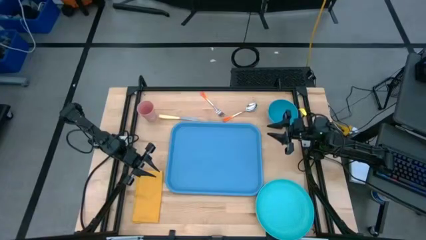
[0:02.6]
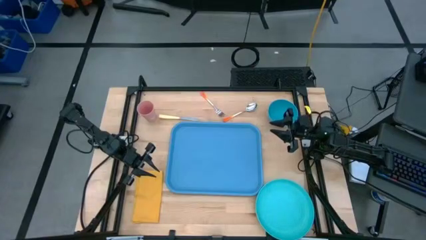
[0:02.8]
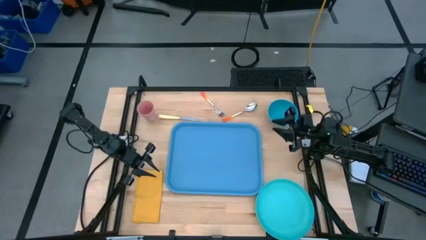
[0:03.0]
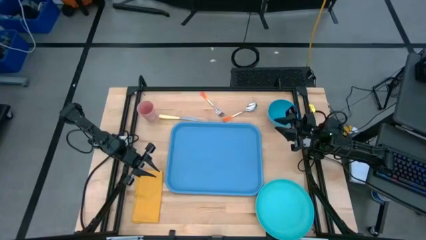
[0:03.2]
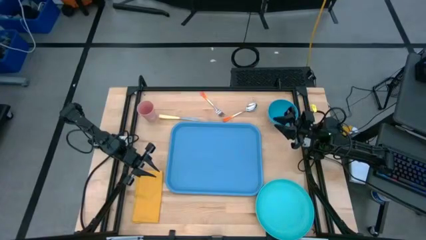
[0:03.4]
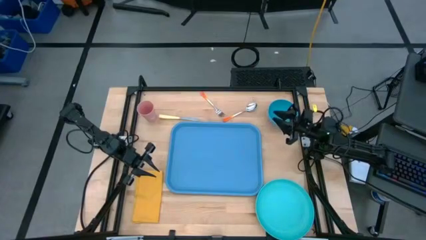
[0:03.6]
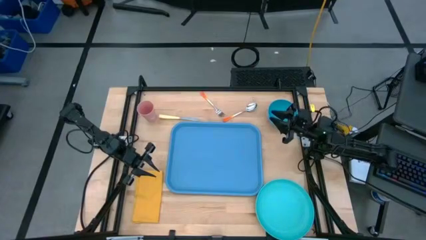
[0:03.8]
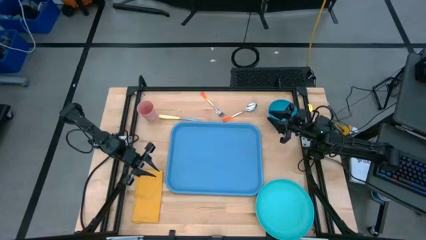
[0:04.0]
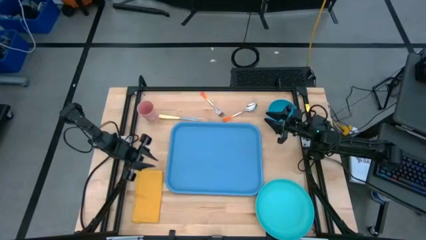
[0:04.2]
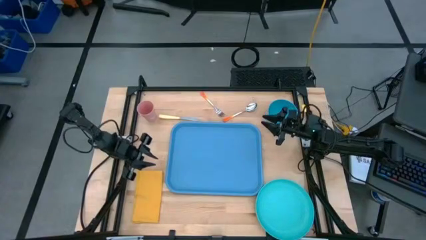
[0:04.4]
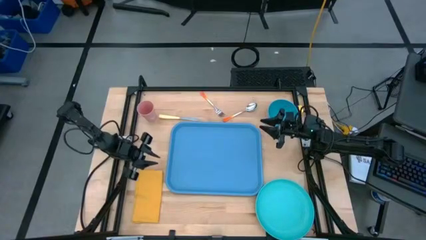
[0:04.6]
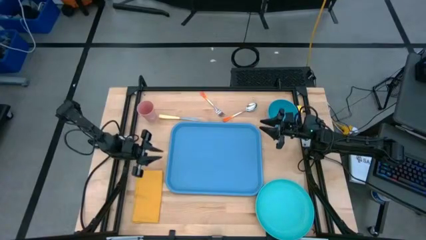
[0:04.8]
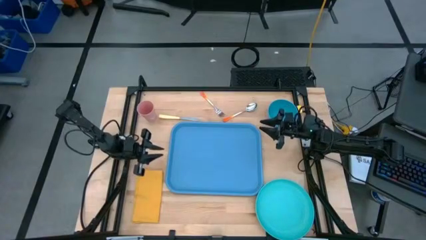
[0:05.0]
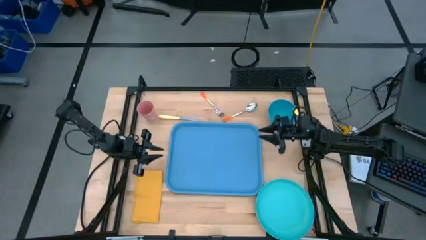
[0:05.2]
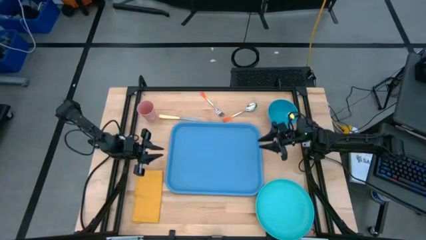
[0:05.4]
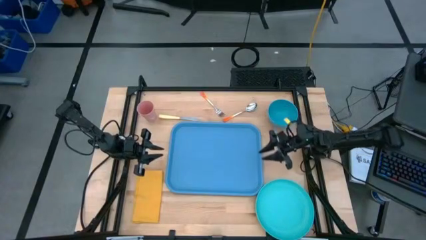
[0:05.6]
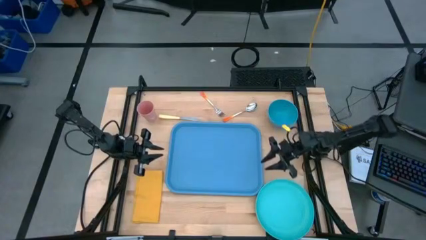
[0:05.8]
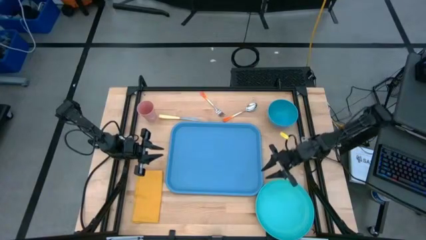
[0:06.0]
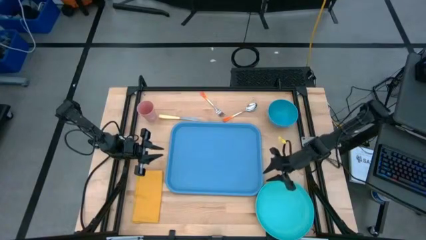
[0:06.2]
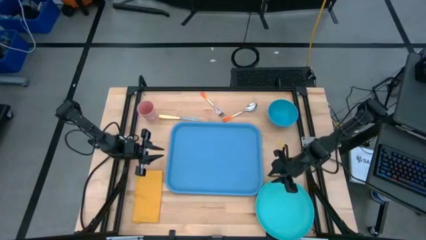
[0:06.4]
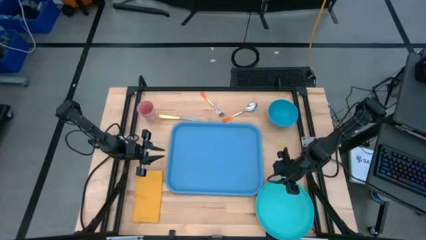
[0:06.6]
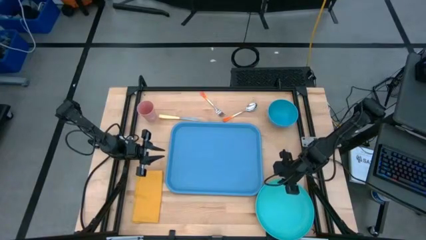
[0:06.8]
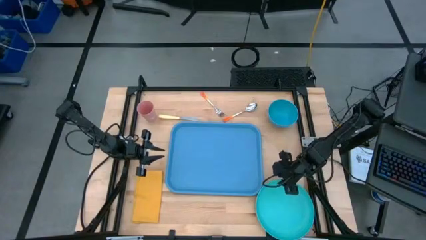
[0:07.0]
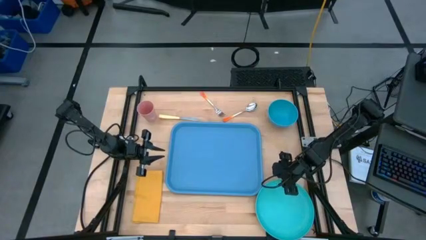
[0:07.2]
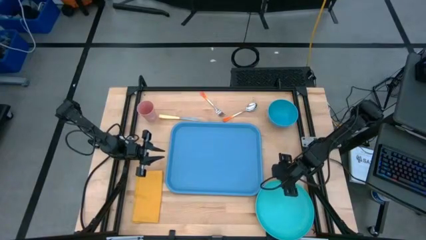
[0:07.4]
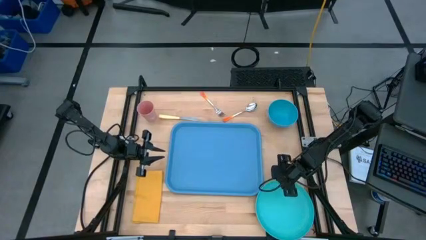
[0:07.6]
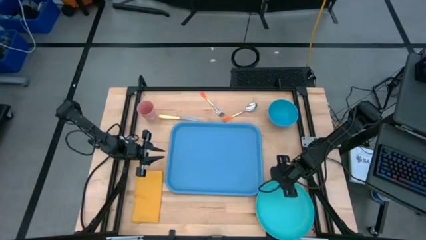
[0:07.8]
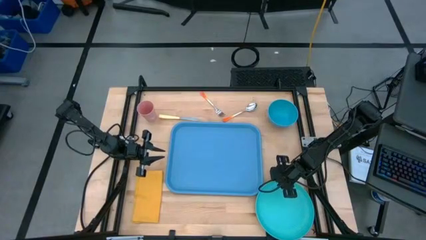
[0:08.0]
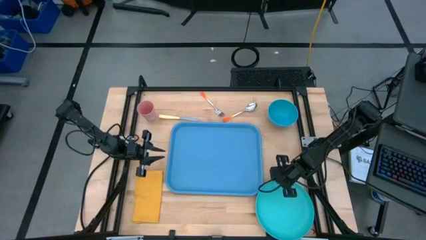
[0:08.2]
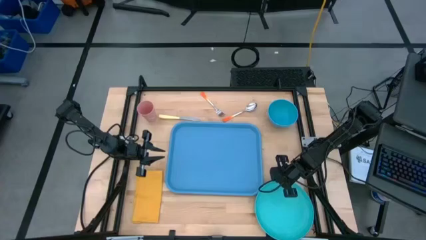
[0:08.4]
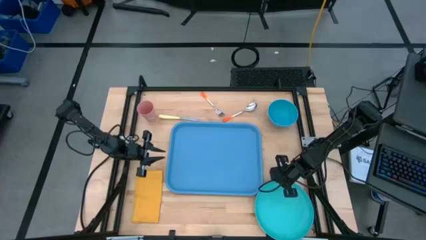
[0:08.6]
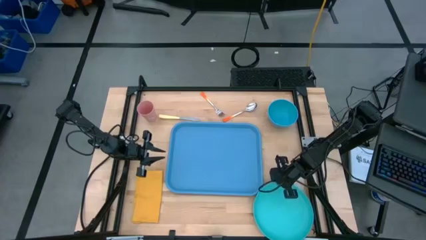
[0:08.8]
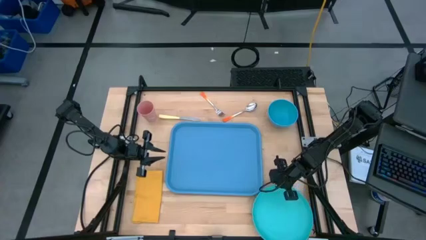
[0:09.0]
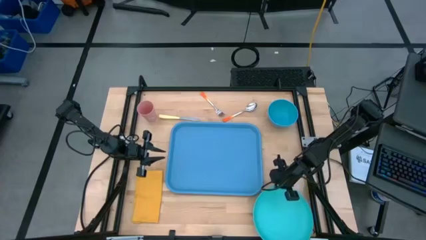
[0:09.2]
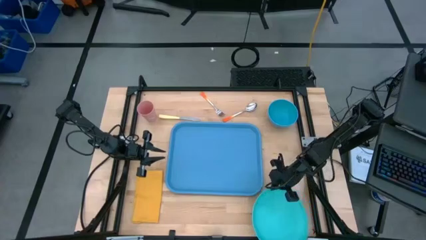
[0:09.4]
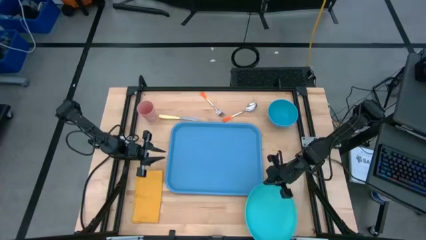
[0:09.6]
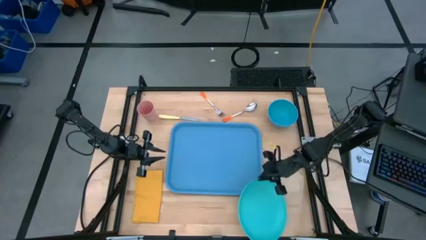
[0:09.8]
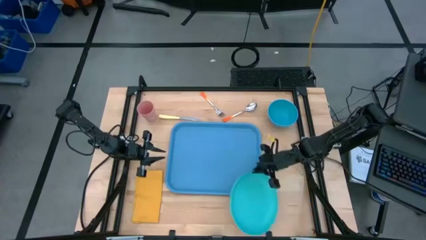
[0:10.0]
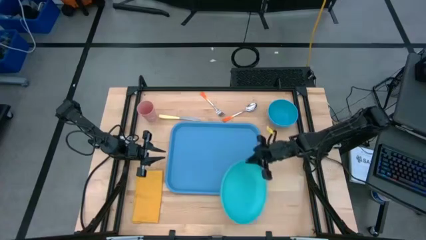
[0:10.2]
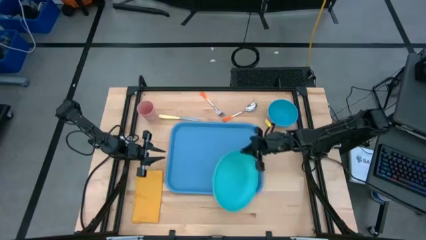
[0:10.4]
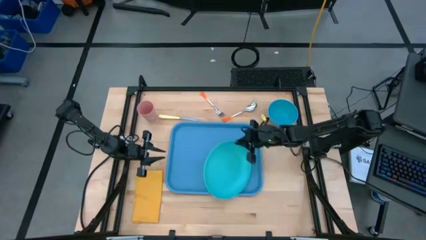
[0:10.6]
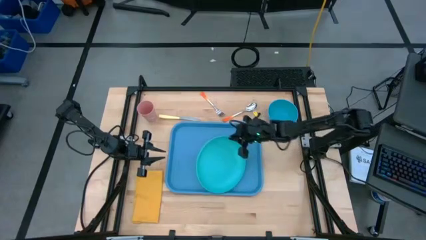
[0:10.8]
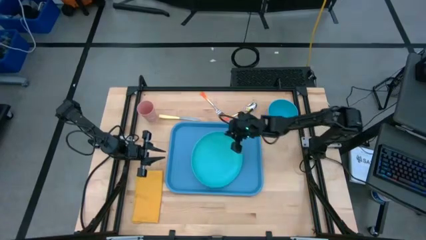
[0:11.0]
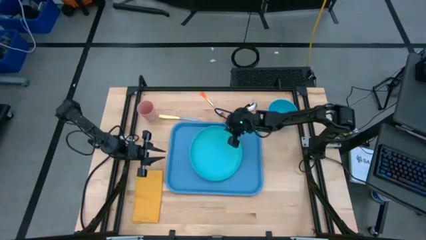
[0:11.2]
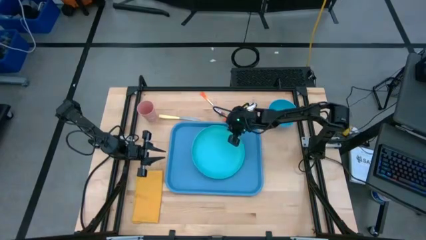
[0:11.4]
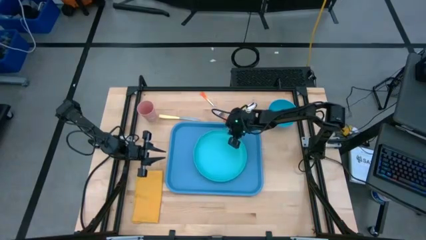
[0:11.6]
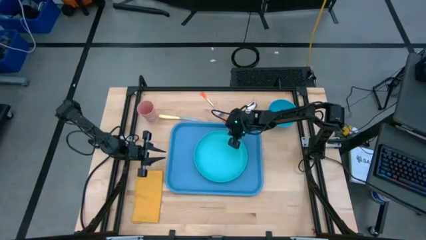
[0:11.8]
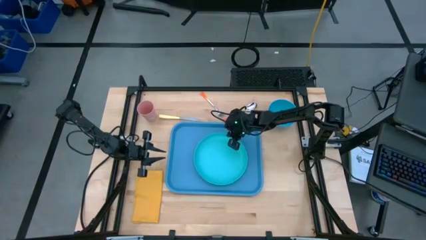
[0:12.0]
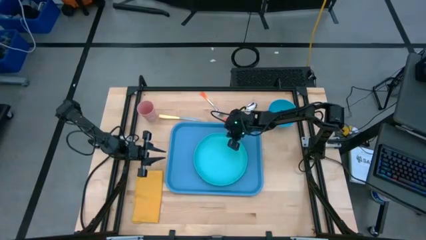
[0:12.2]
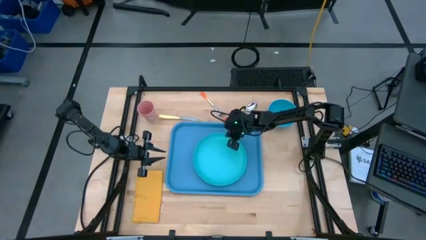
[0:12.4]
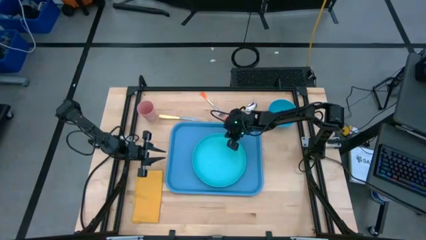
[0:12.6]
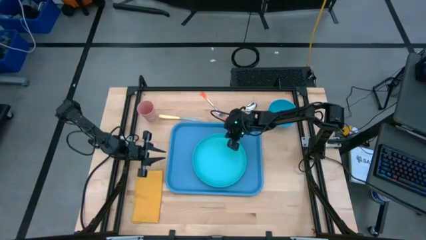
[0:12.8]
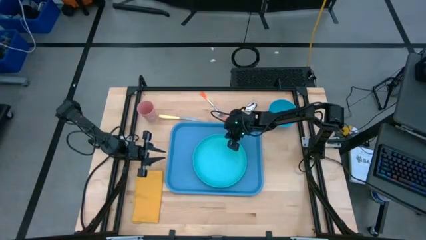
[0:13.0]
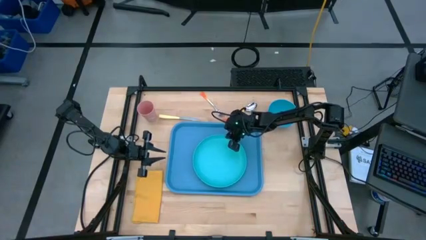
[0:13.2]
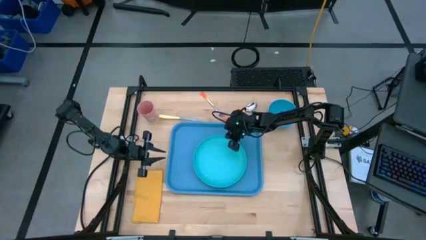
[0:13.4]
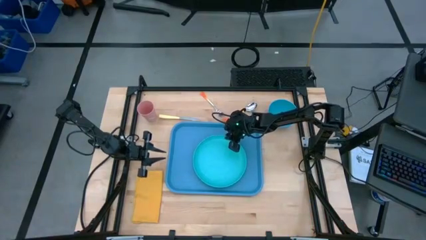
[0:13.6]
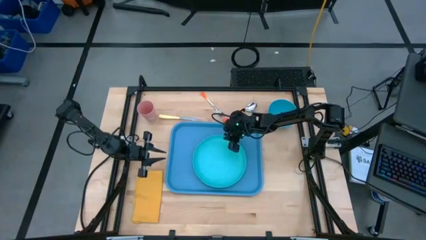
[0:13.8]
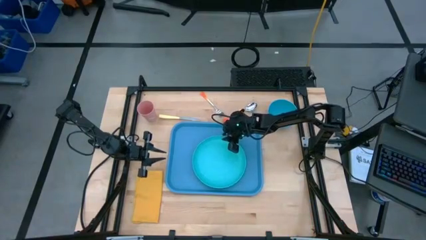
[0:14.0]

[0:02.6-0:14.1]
Task: Set up tray
Put the green plate on the blue tray

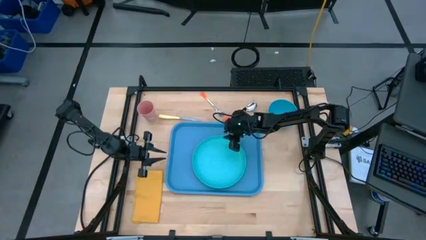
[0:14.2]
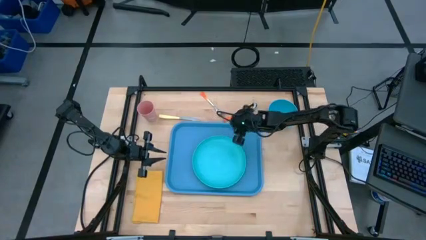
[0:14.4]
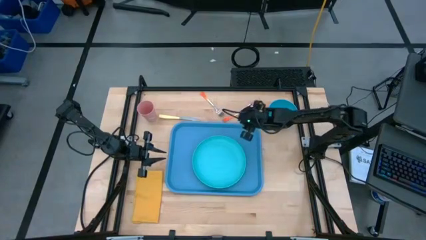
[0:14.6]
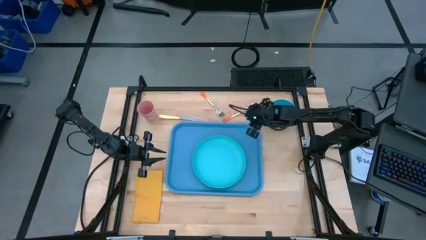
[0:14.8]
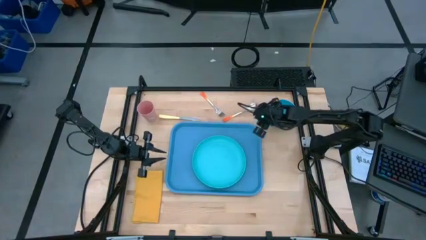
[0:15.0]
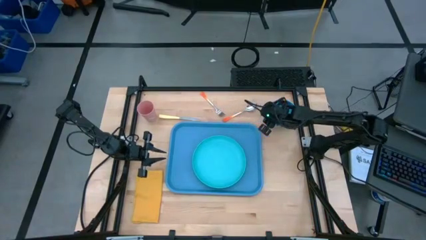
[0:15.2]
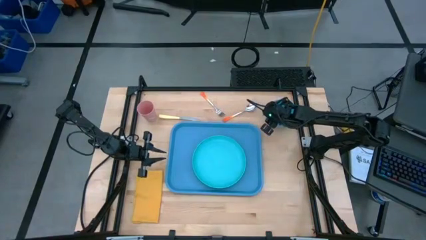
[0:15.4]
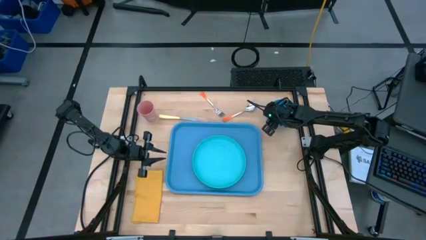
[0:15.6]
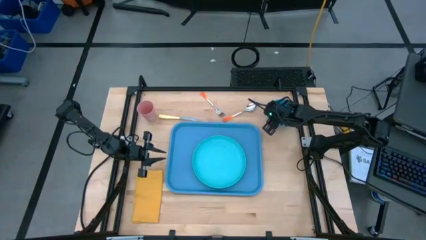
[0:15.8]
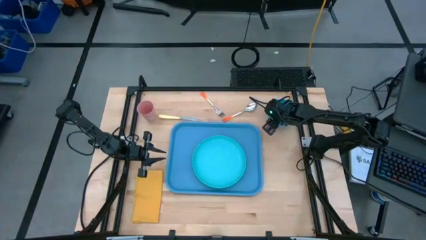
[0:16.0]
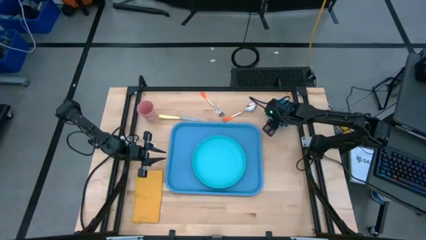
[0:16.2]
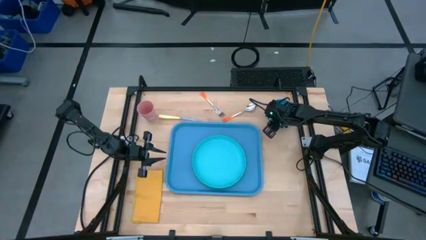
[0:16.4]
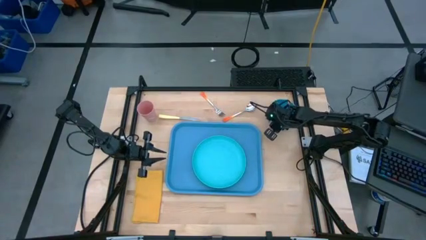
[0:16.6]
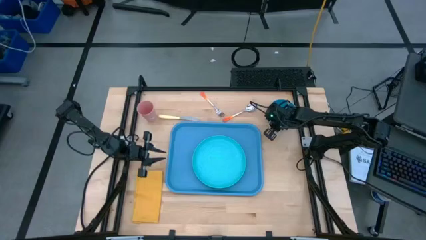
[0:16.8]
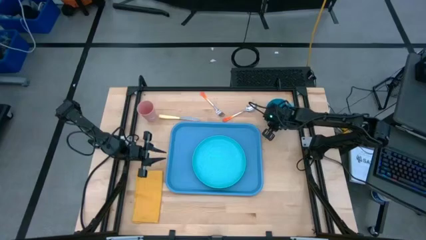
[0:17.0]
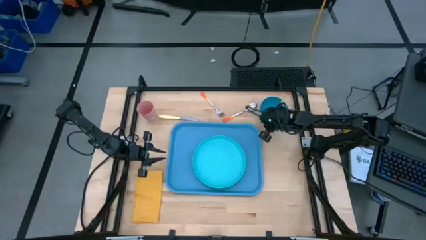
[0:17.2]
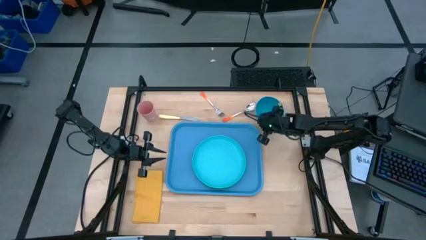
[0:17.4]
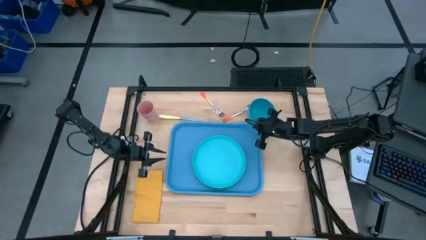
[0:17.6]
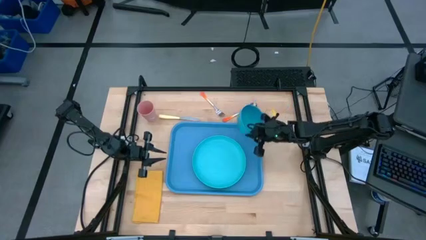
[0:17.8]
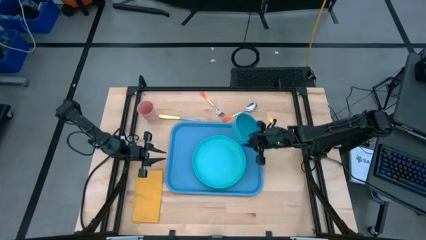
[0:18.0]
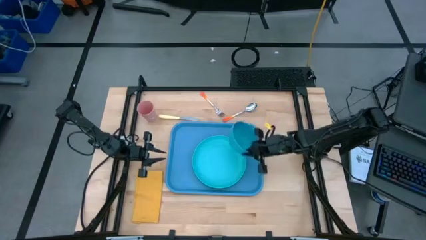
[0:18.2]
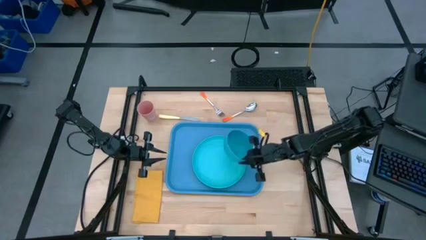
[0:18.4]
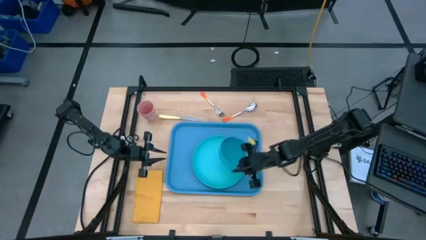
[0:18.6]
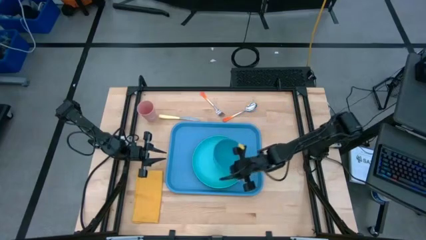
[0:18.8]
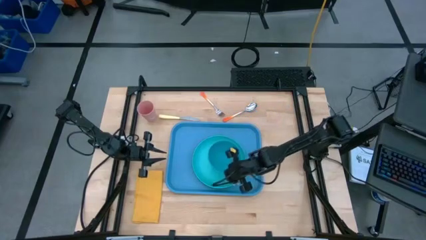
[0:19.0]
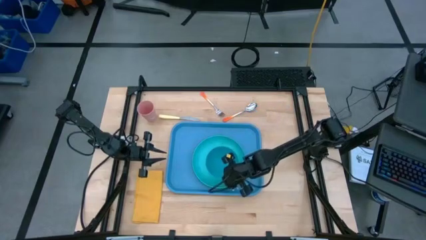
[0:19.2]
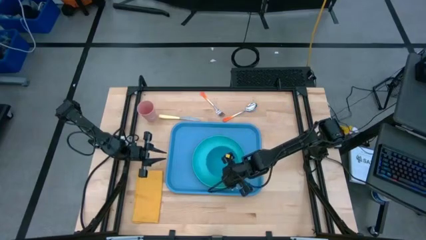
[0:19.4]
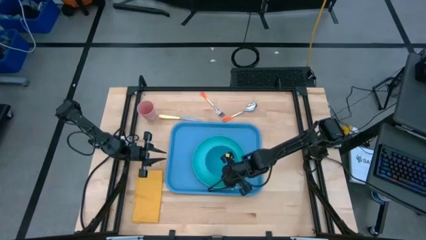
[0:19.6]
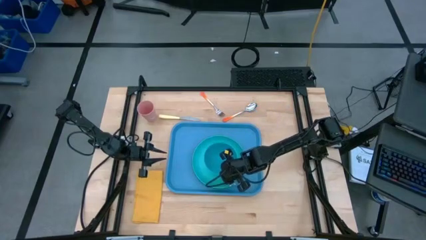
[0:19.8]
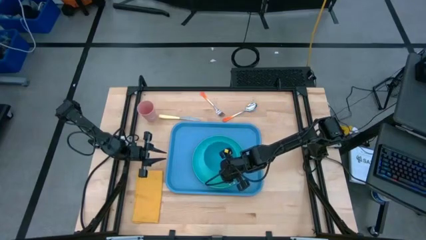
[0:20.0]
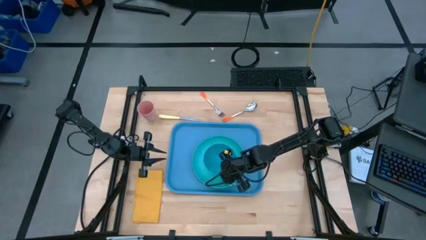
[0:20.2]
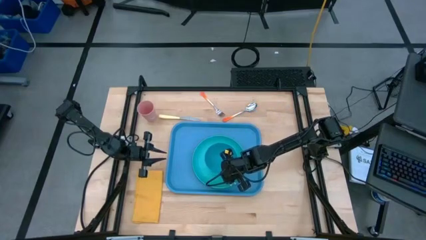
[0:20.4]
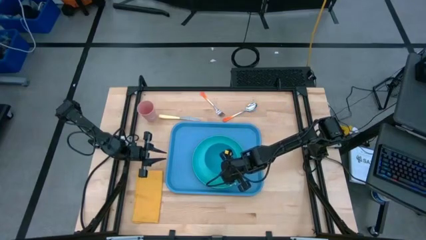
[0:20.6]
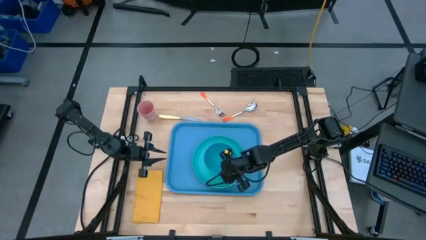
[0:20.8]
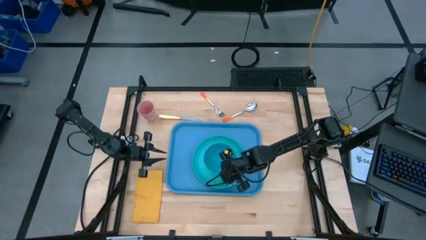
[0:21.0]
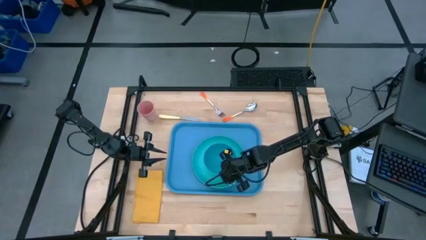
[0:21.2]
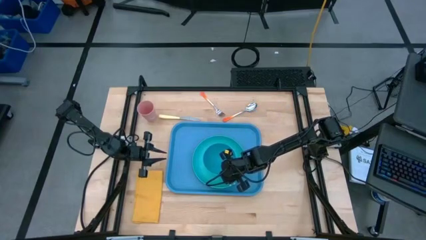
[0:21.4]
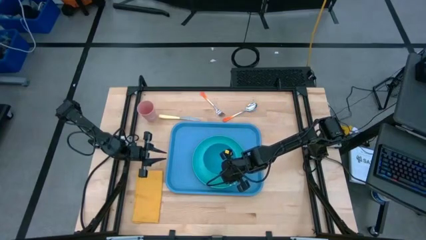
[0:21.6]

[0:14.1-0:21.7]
Put the blue bowl on the green plate
